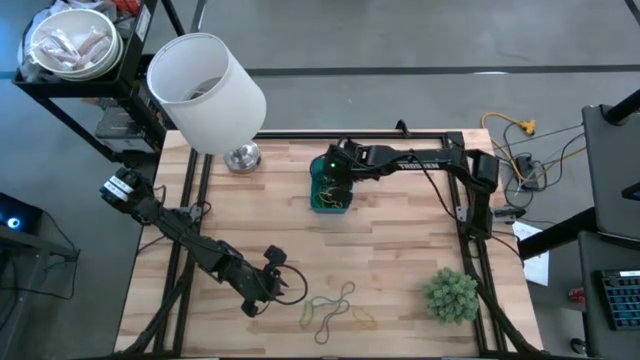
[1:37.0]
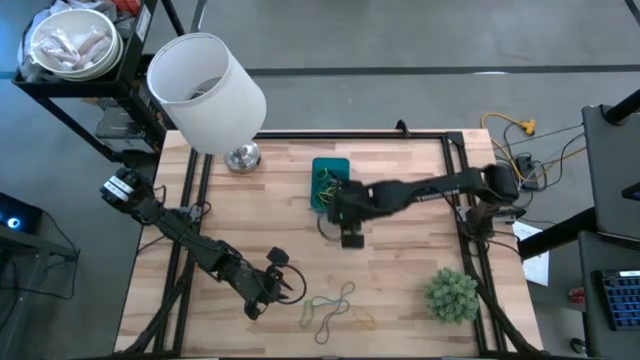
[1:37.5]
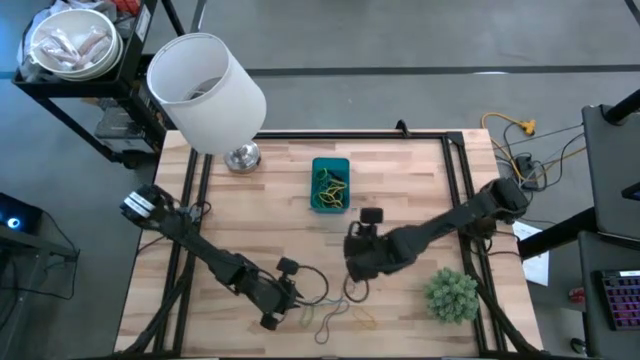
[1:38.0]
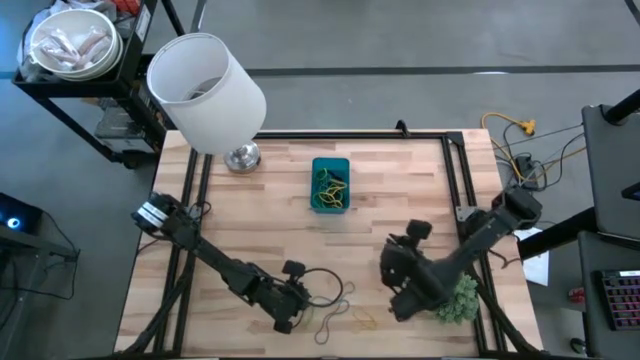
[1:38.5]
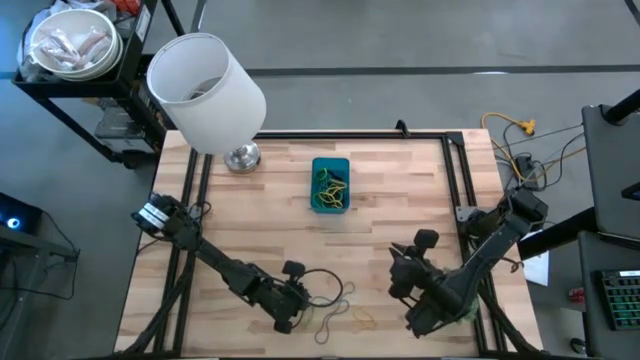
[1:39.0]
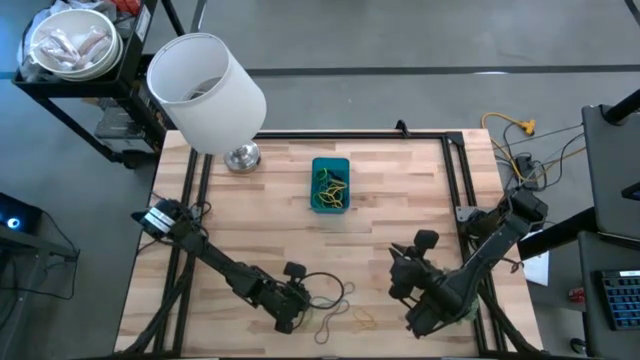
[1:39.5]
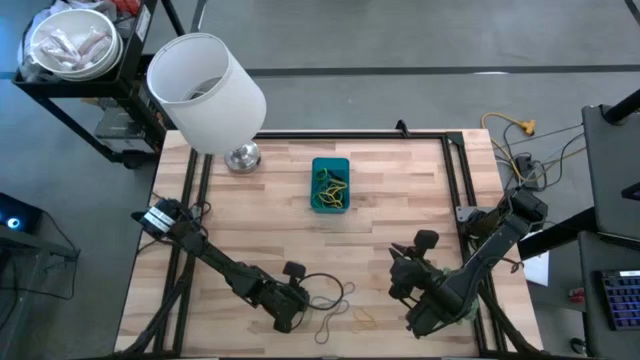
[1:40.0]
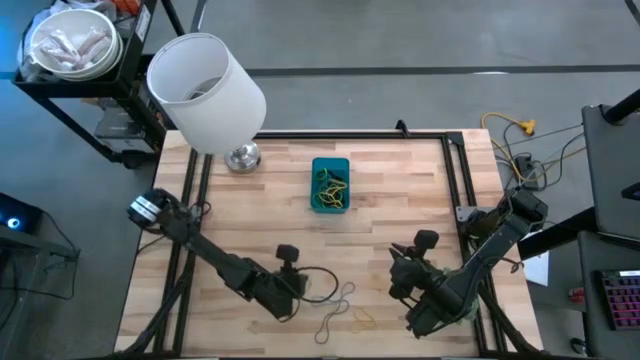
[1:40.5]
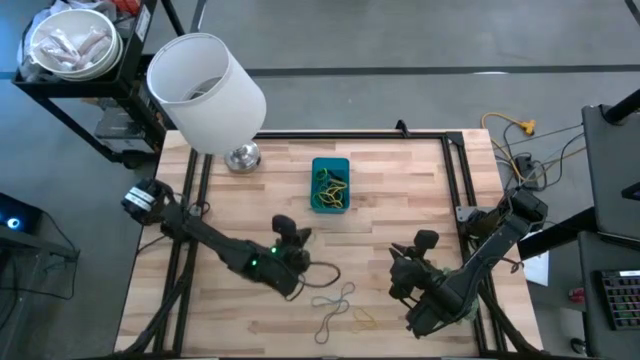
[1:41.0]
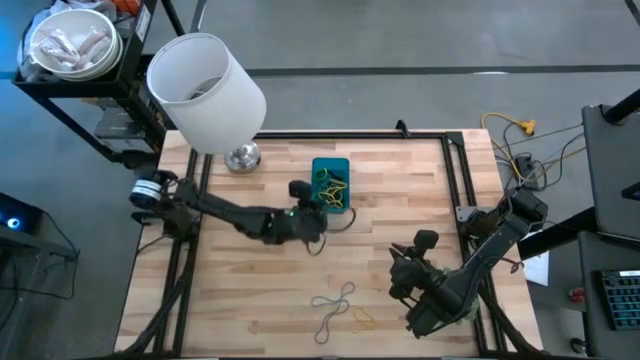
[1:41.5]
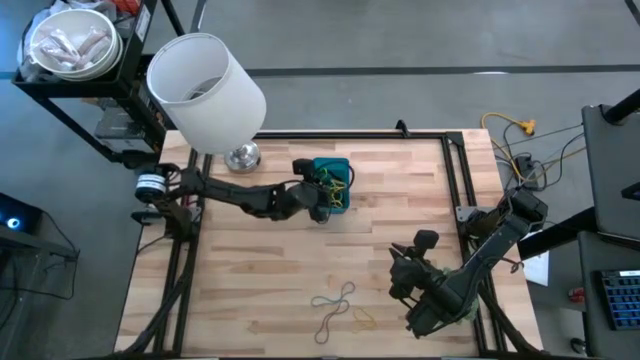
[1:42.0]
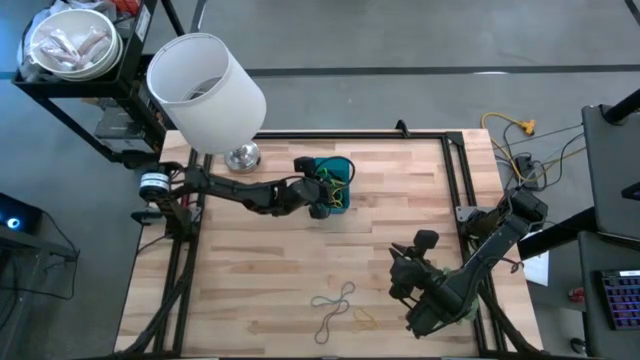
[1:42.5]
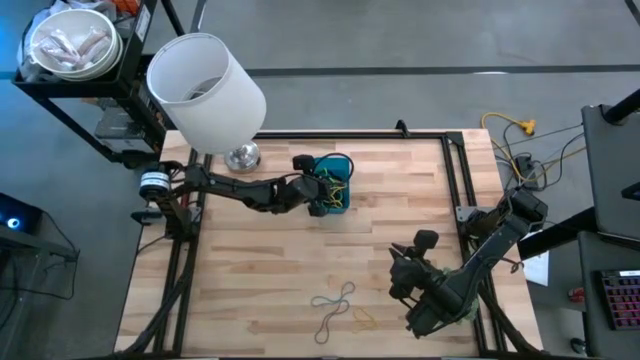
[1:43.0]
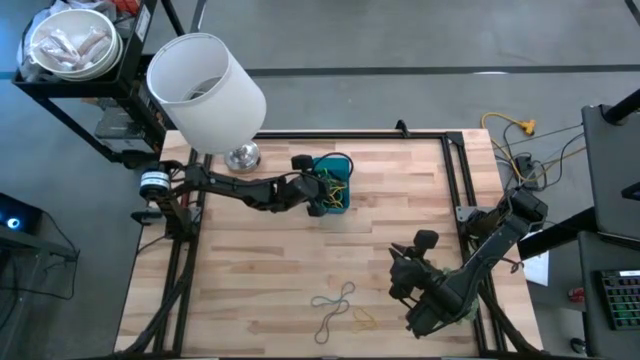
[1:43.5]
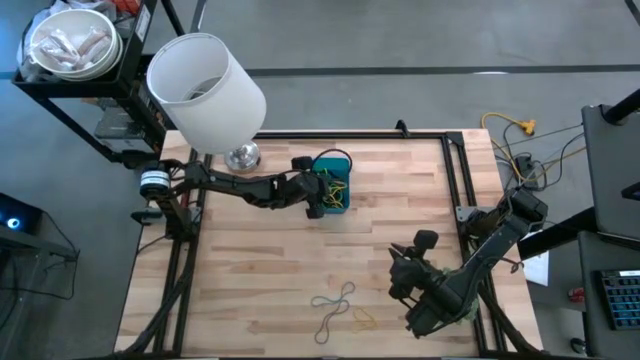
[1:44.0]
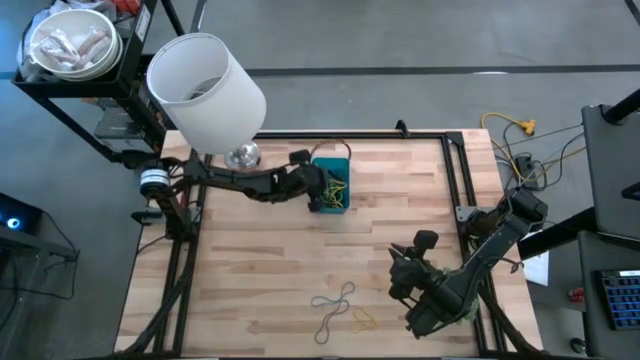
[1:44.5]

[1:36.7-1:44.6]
Task: Pick and place rubber bands into bin
Put the green rubber band into the blue bin

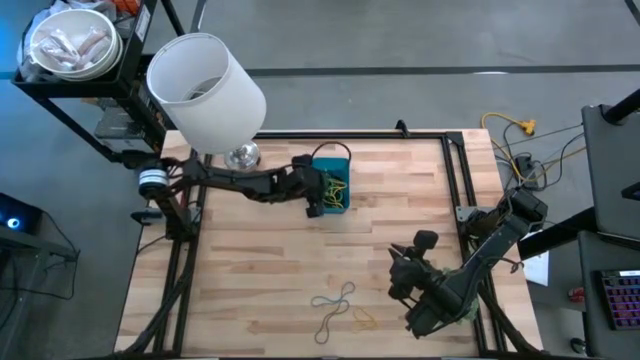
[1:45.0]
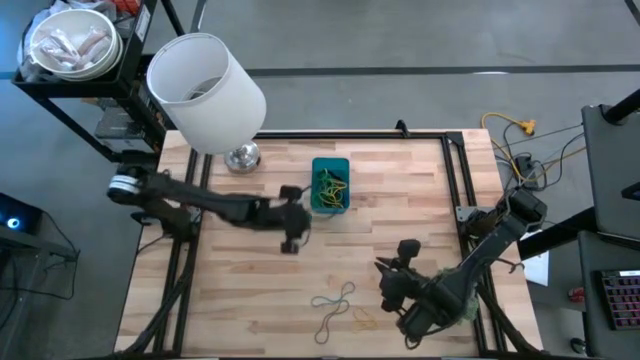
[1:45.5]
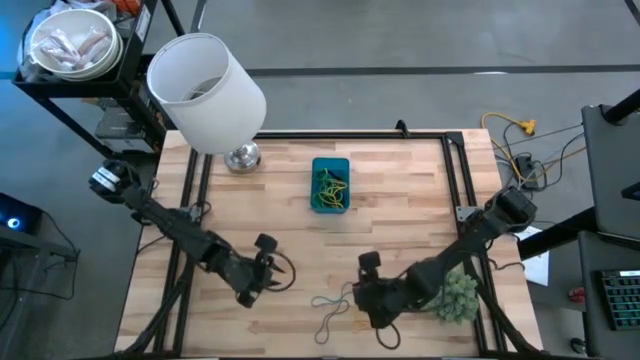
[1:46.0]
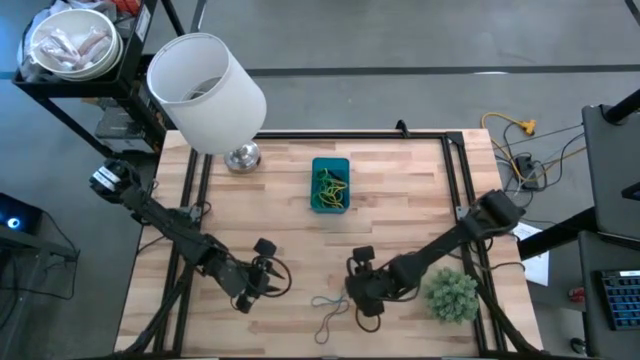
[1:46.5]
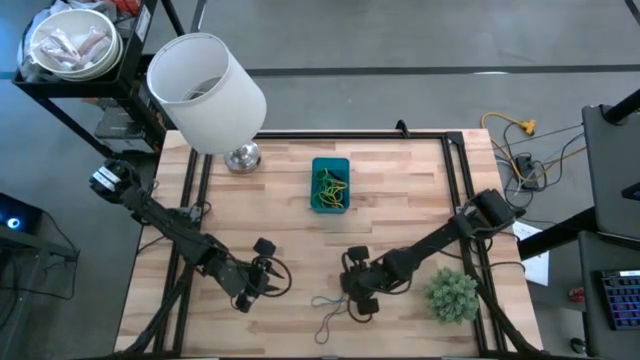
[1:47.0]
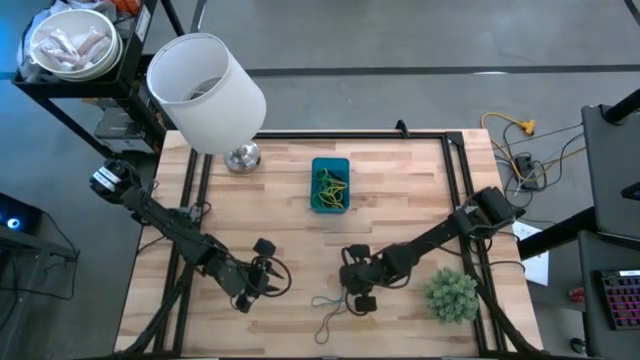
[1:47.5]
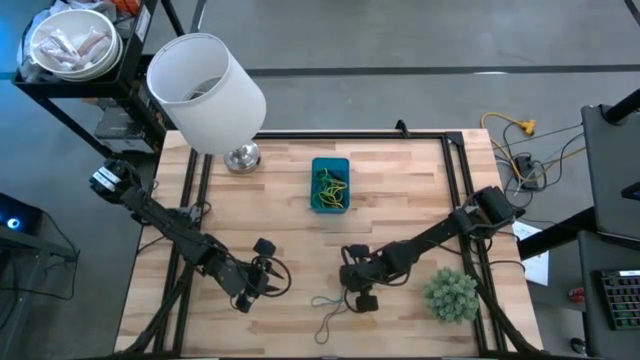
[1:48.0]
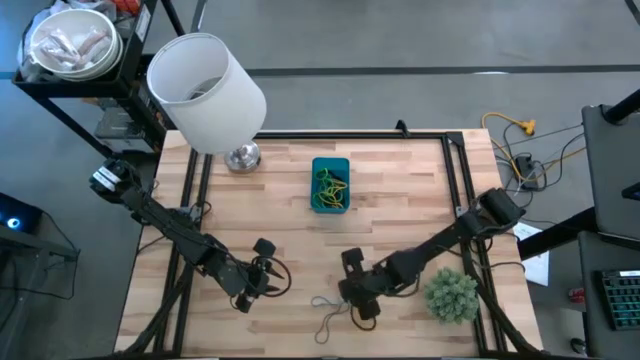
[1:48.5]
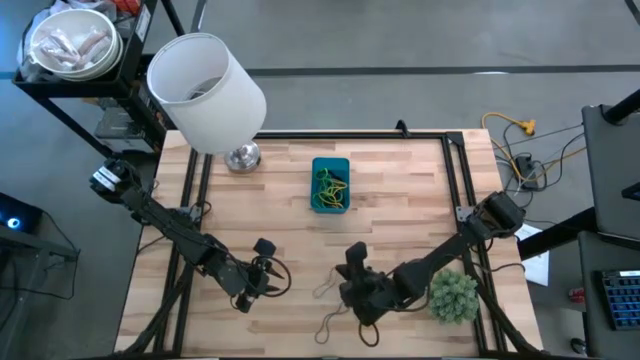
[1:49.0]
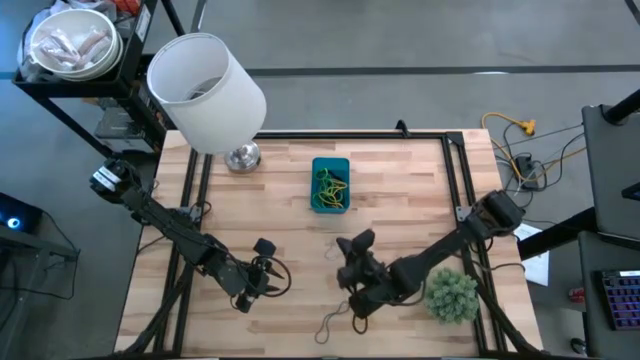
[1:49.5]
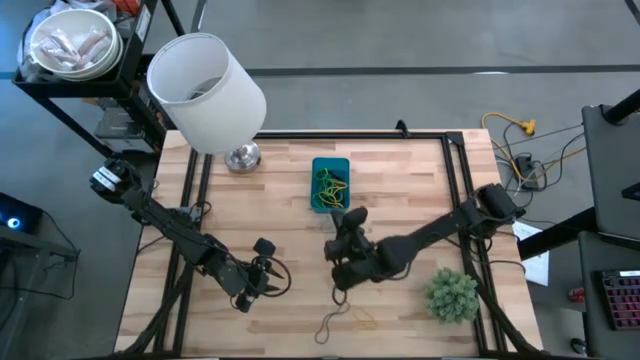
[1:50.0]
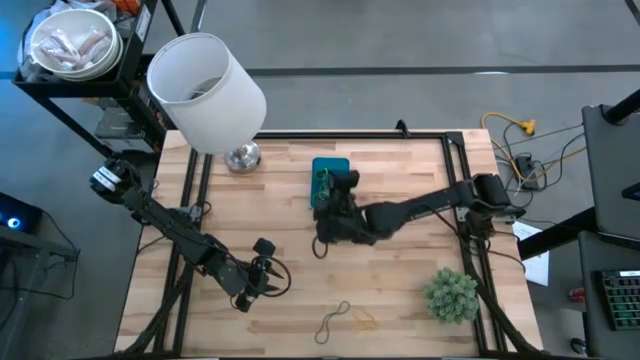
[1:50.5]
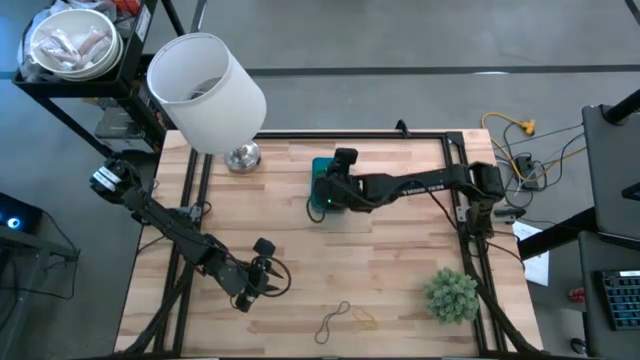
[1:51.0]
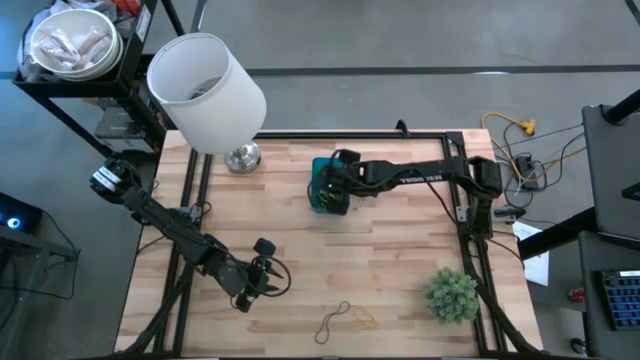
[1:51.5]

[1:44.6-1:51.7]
Put the blue rubber band into the blue bin

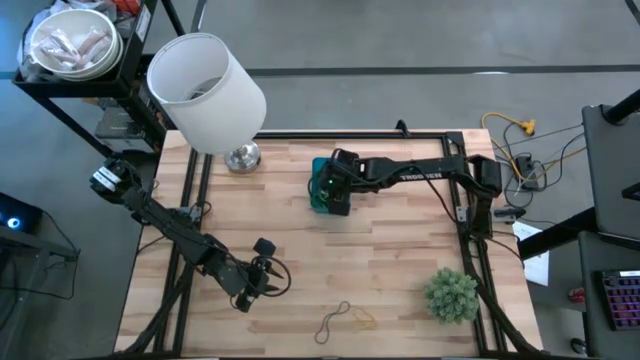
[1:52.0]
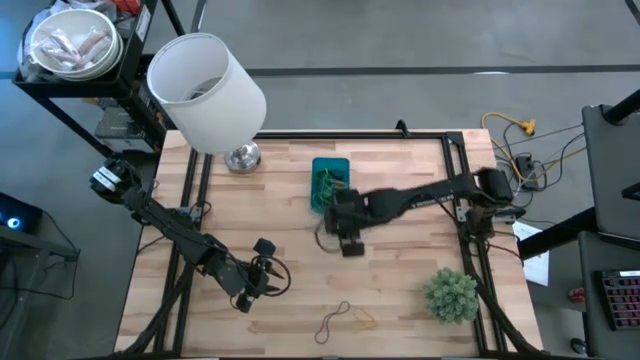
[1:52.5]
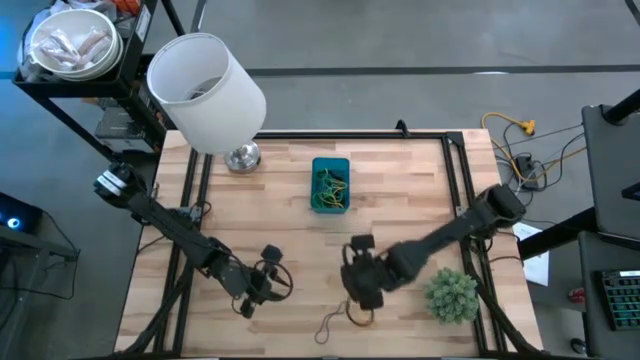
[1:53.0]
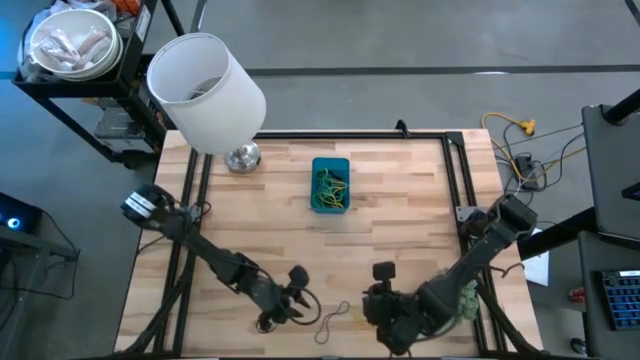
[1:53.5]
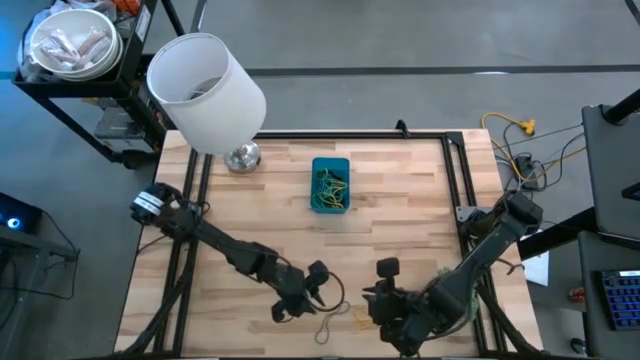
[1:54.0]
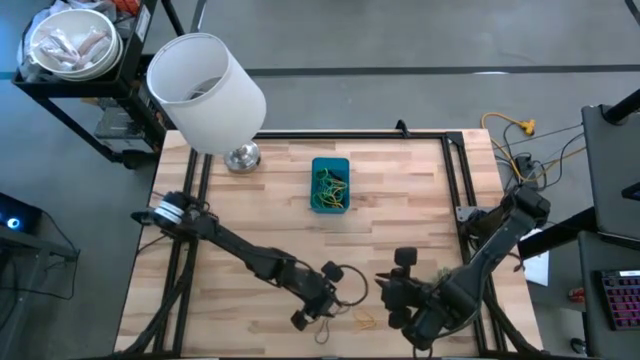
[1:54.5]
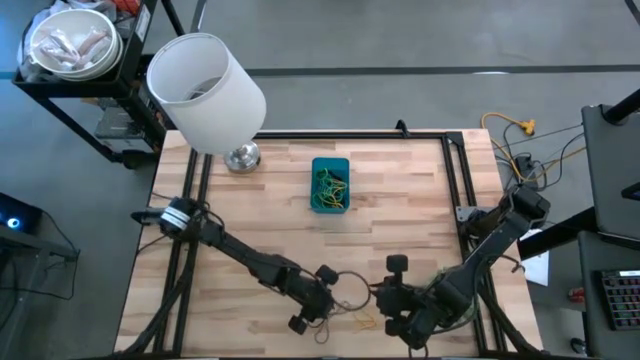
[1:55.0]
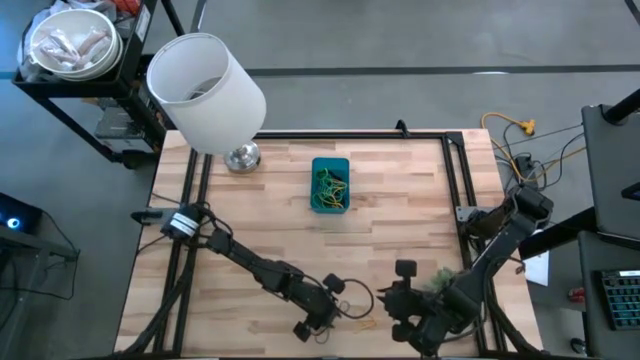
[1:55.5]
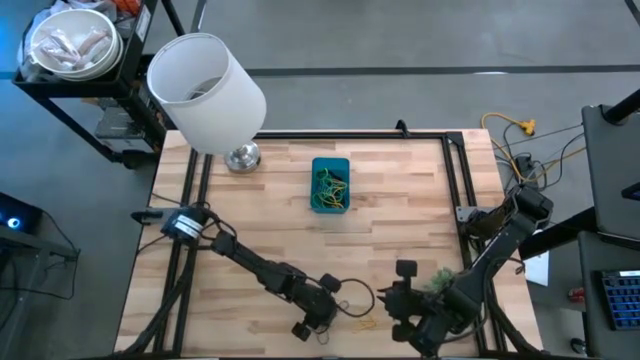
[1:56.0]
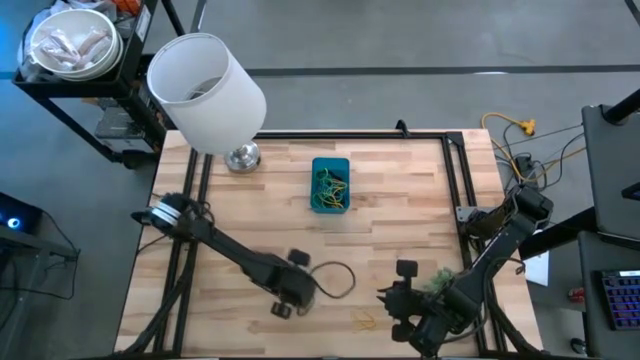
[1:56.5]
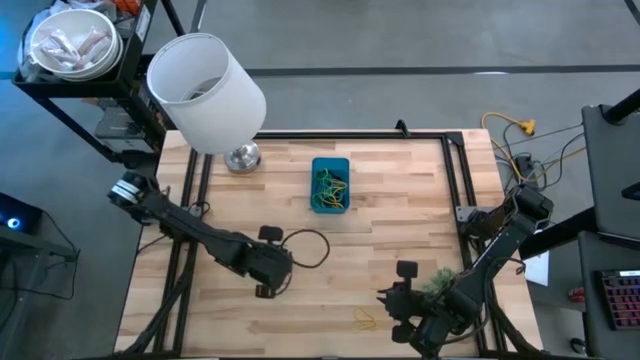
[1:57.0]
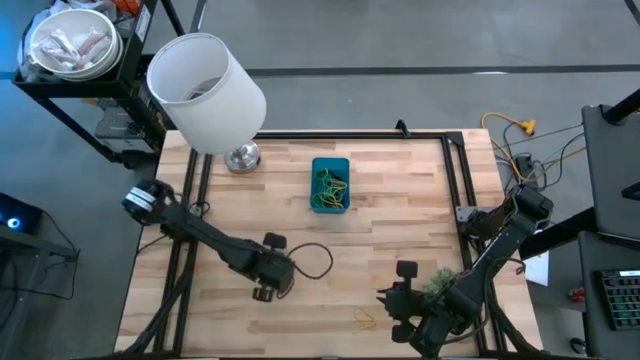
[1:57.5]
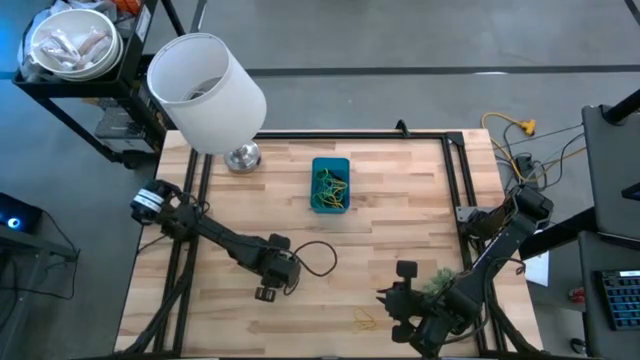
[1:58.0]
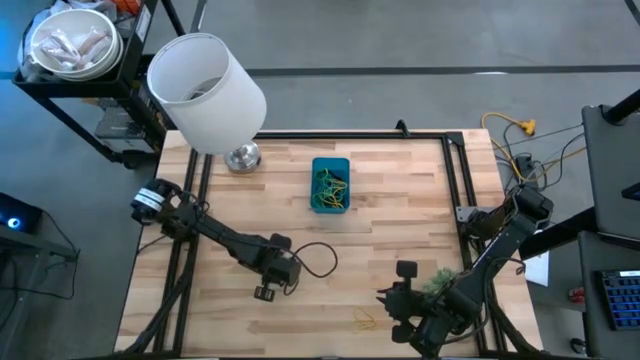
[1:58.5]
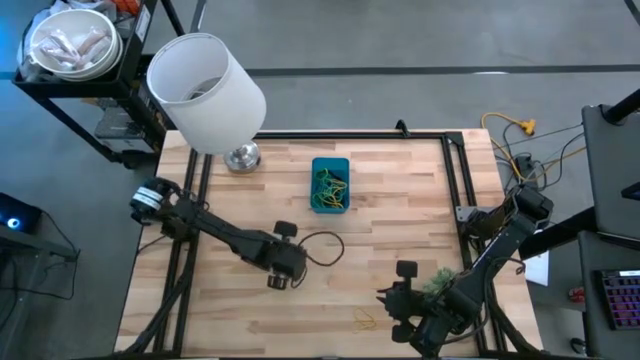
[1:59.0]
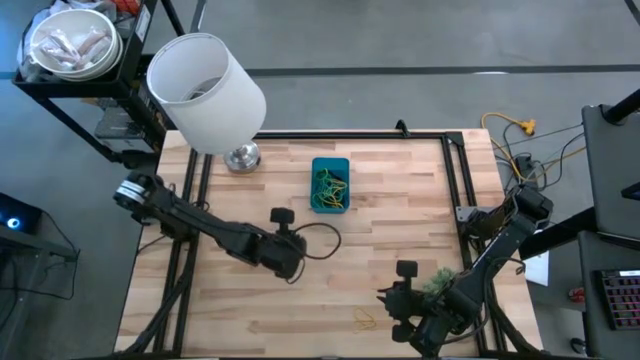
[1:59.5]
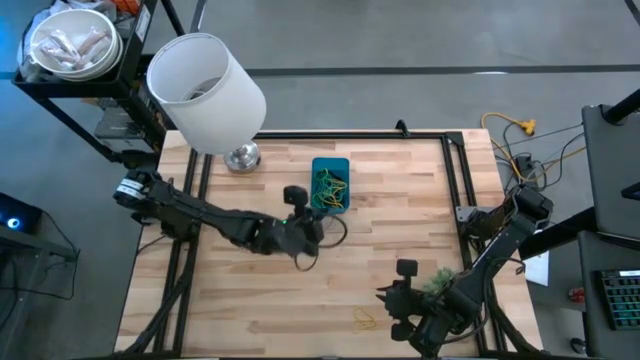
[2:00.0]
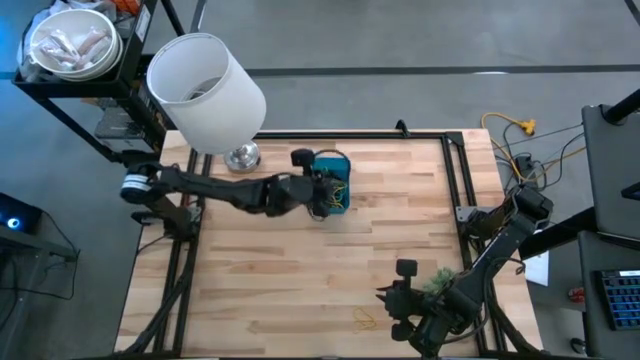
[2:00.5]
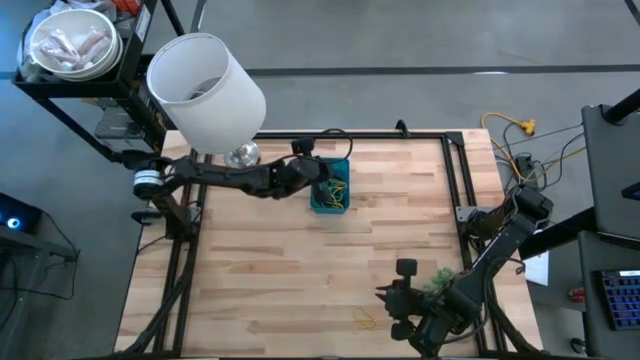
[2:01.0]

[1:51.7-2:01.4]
Put the violet rubber band into the blue bin
